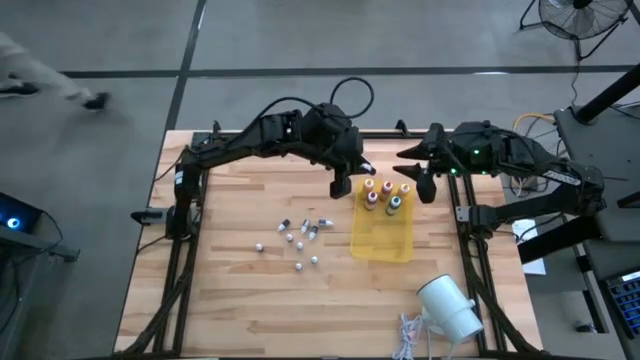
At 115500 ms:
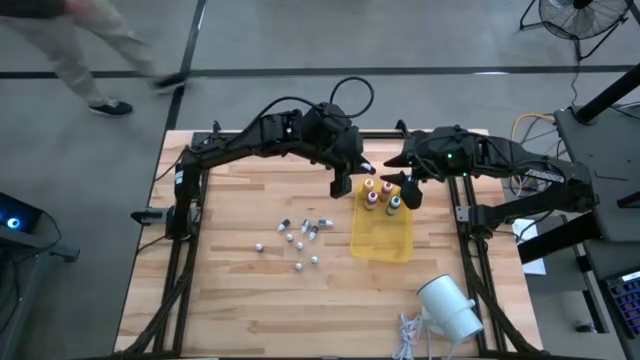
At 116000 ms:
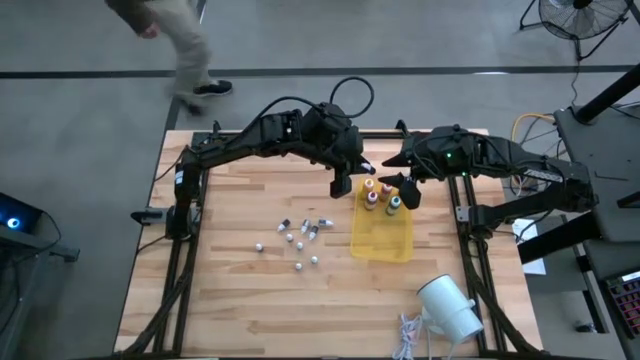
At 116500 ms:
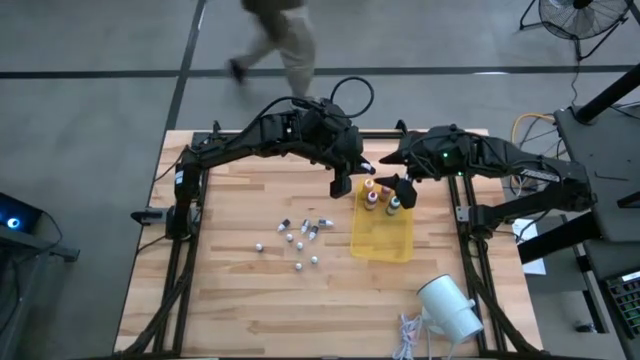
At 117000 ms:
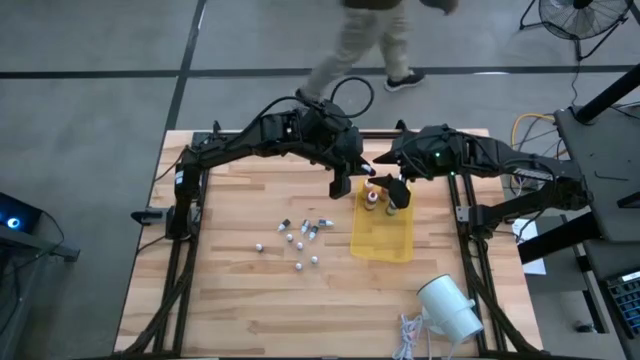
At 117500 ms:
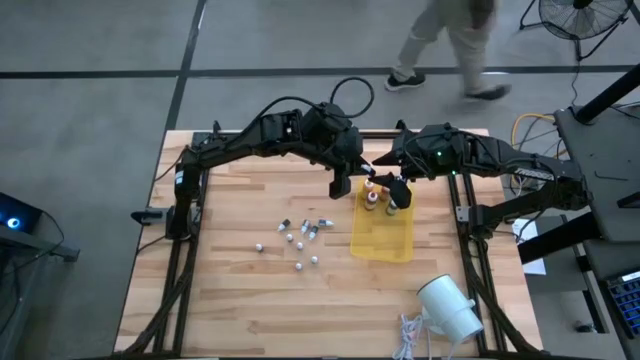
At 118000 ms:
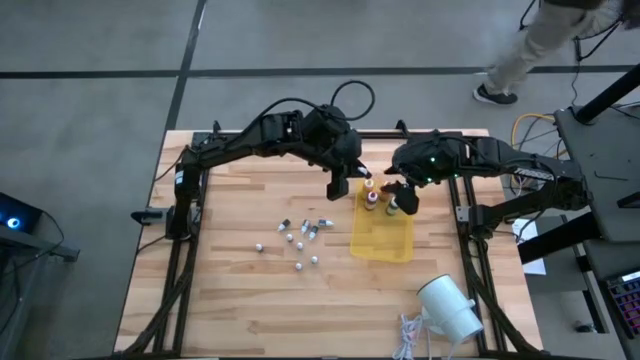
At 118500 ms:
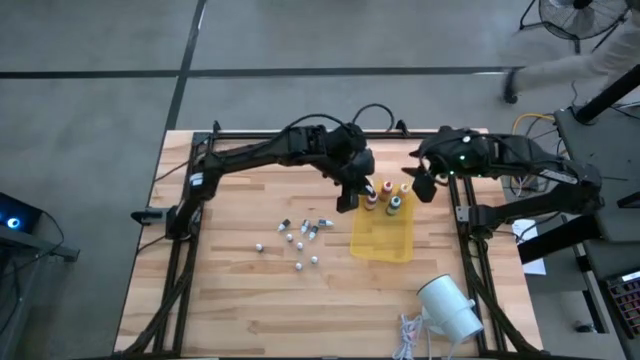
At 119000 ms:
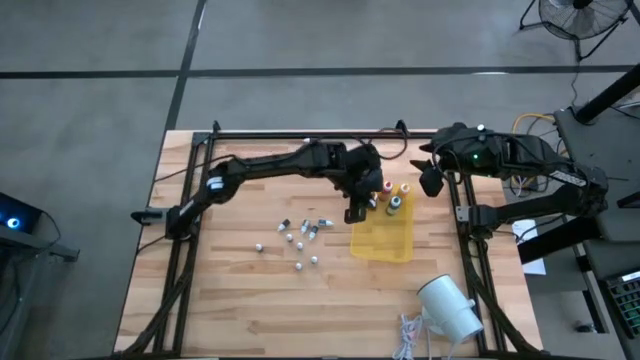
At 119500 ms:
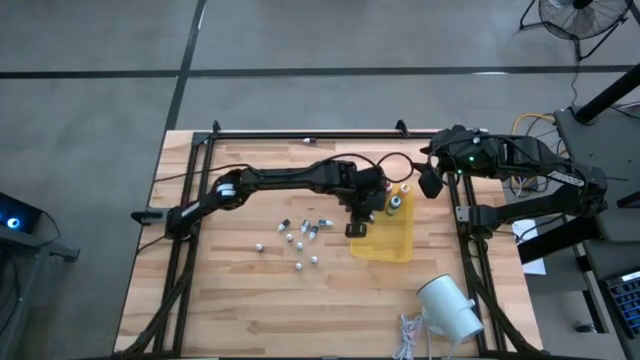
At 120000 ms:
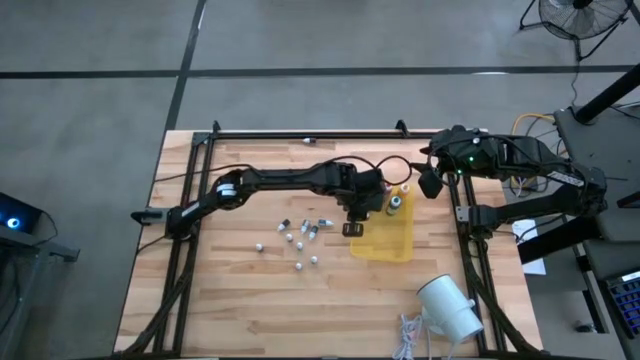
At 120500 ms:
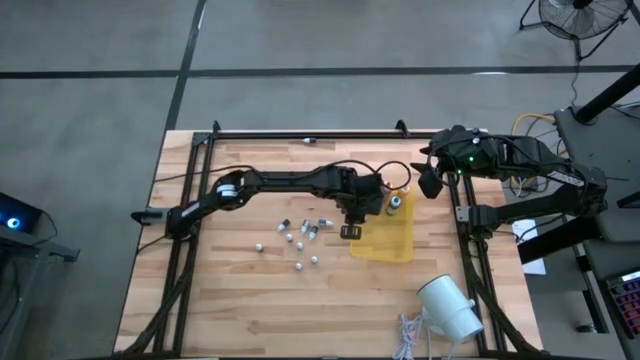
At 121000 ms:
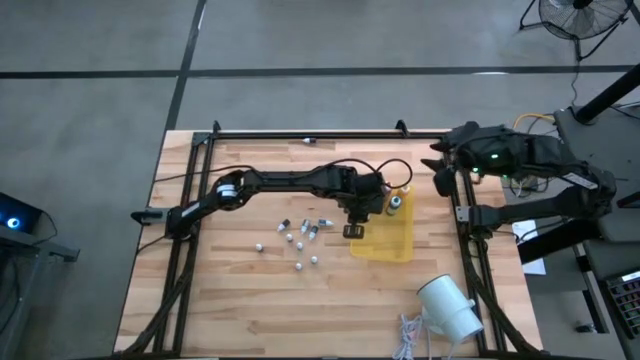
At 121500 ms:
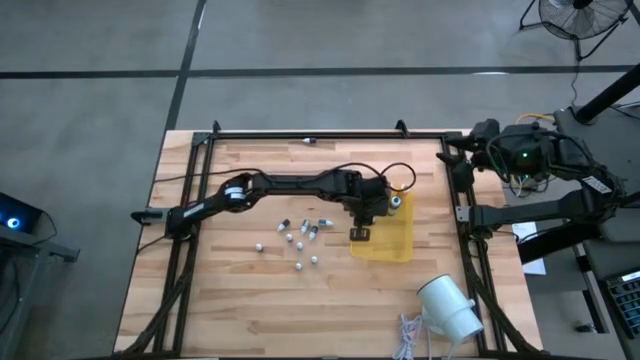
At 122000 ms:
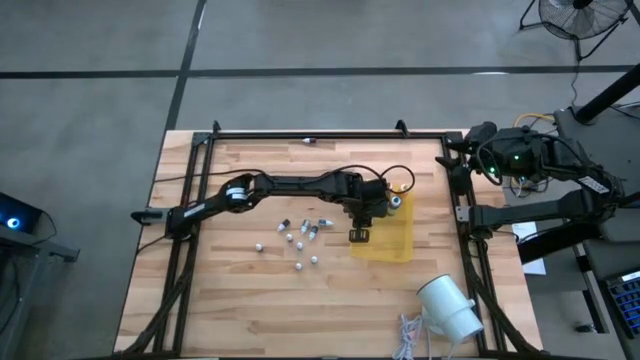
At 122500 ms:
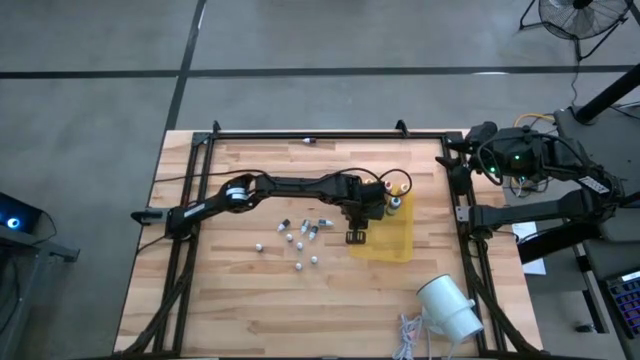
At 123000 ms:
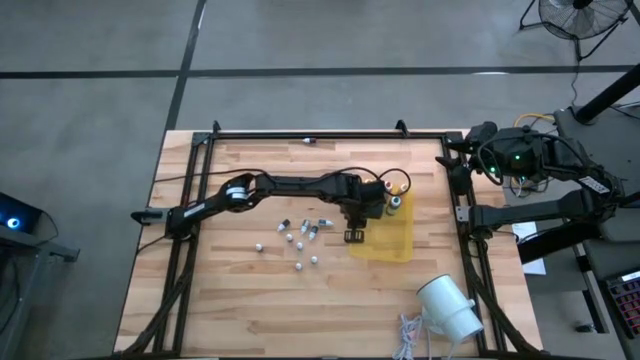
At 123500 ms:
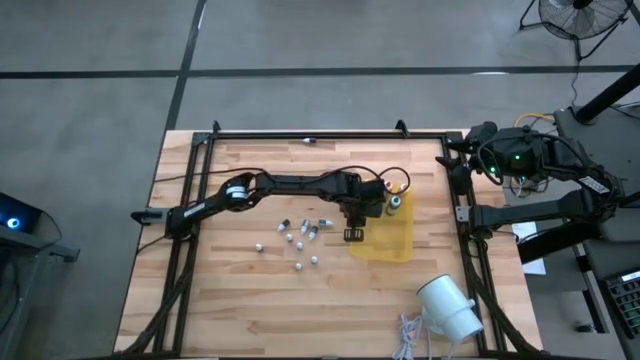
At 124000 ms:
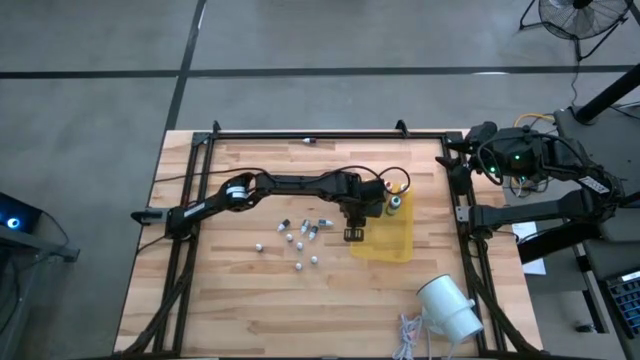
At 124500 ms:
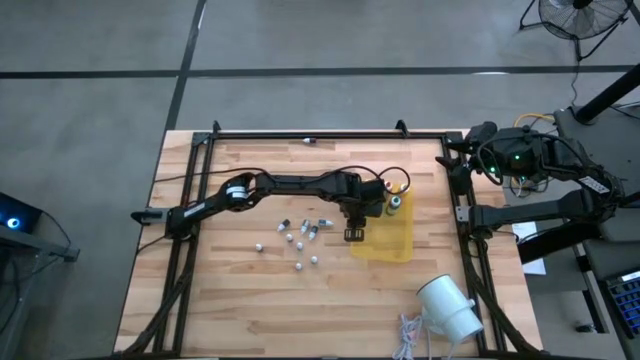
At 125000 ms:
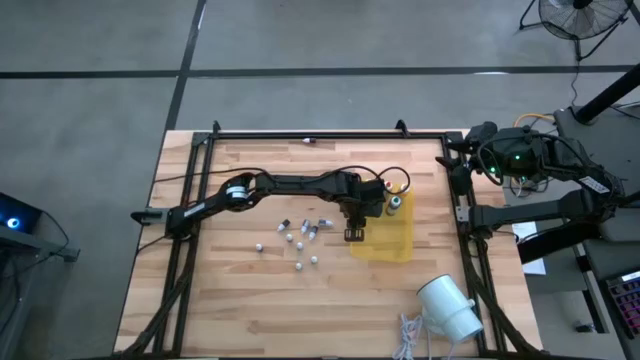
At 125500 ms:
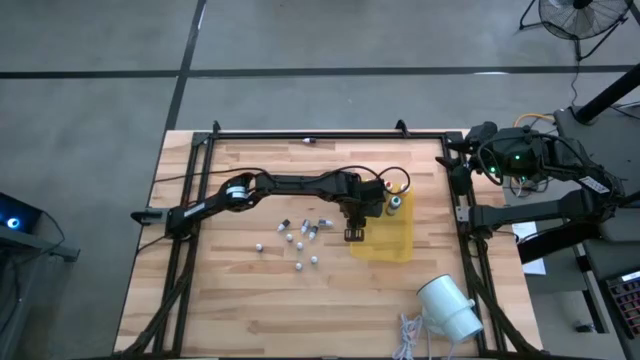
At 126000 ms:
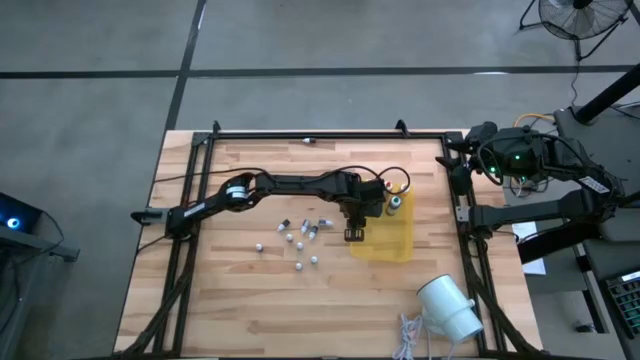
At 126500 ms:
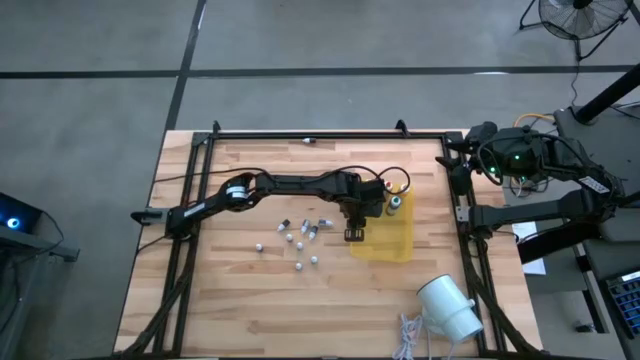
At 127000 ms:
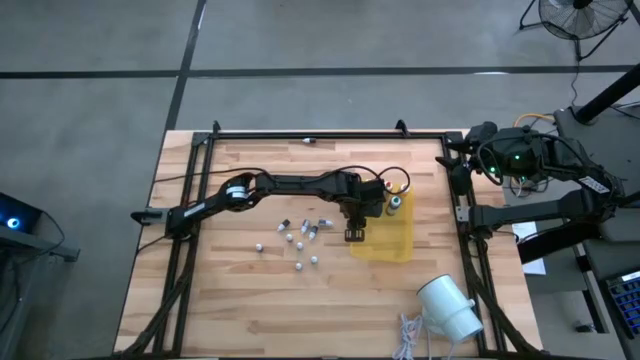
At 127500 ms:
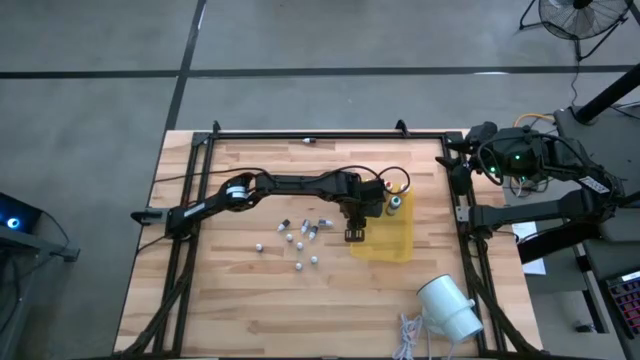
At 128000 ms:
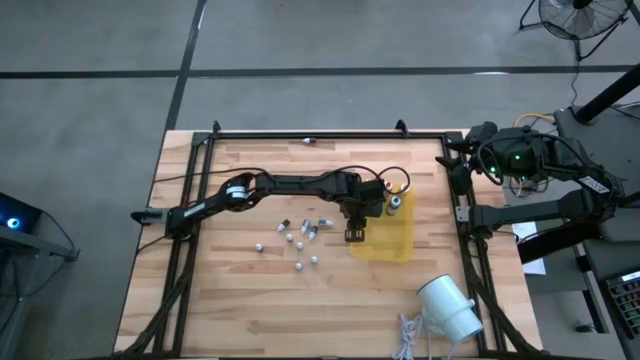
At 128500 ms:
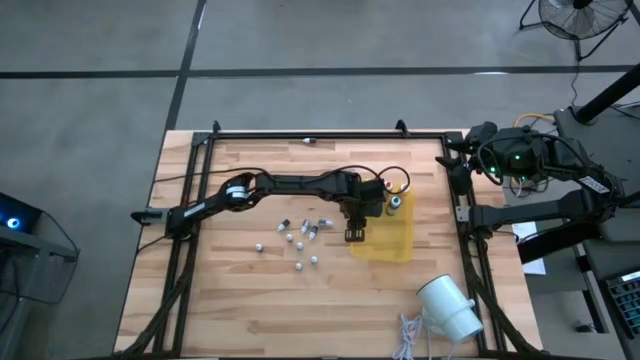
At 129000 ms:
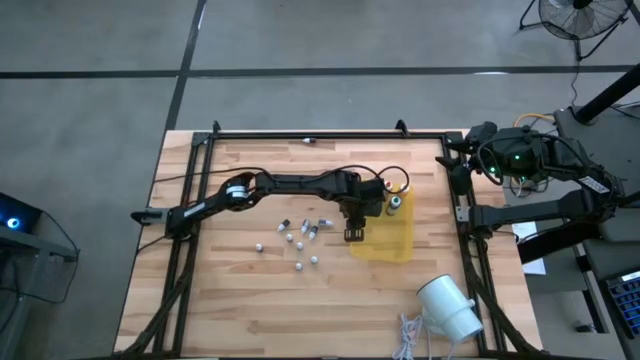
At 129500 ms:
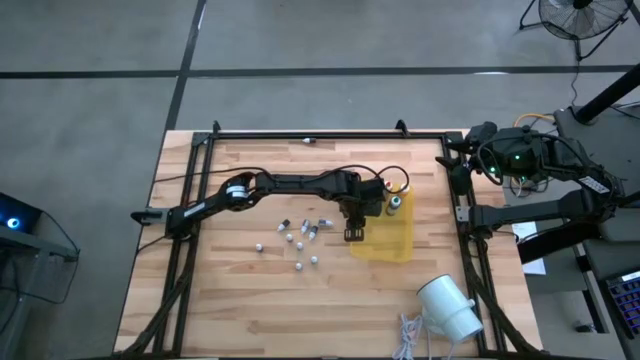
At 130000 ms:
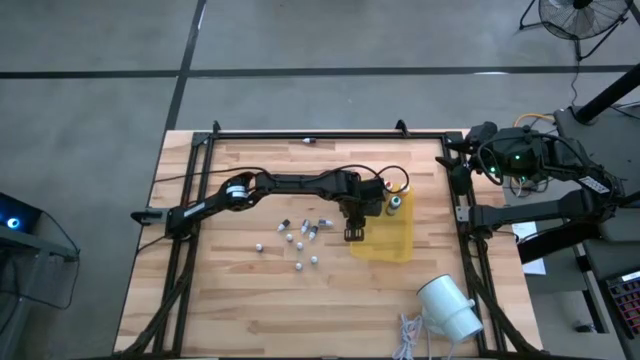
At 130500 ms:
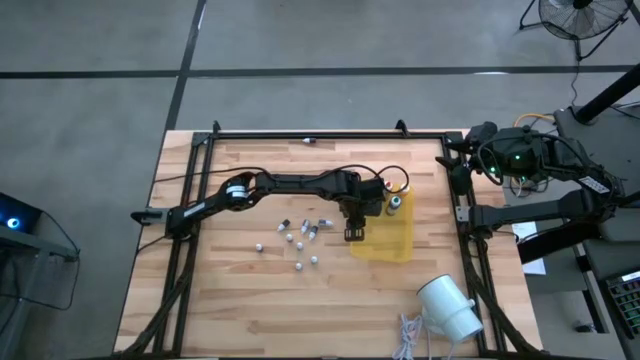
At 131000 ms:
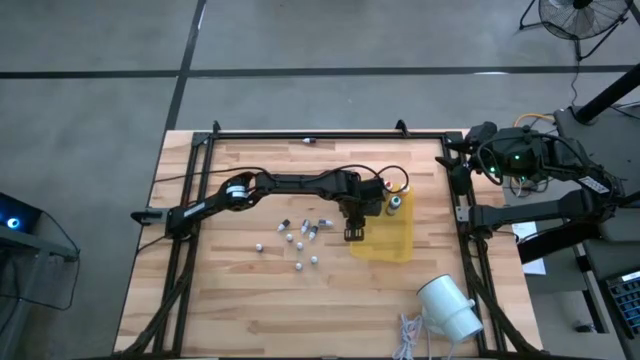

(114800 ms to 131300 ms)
Task: Pick & Place food coloring
Put the top small red food coloring bottle into the yellow bin
